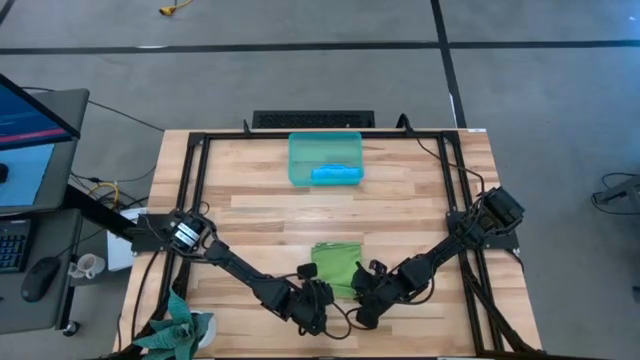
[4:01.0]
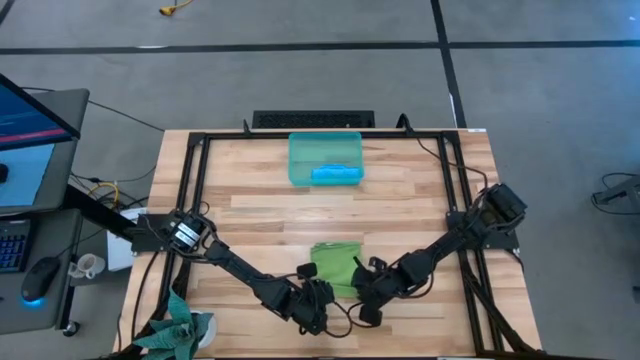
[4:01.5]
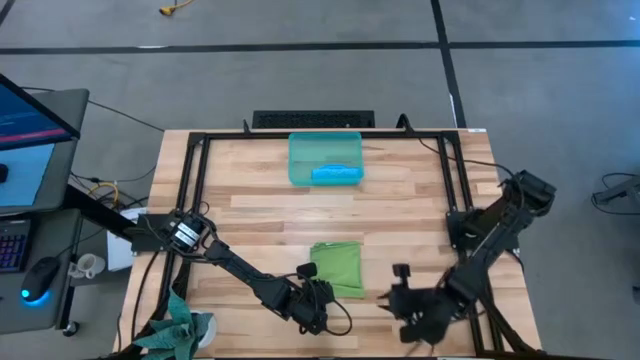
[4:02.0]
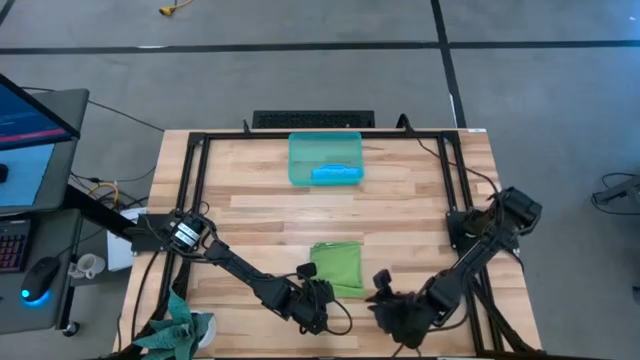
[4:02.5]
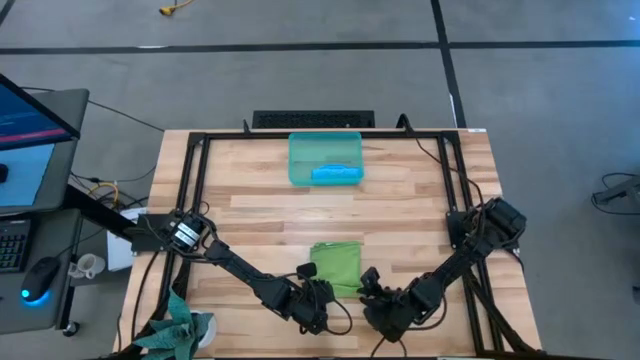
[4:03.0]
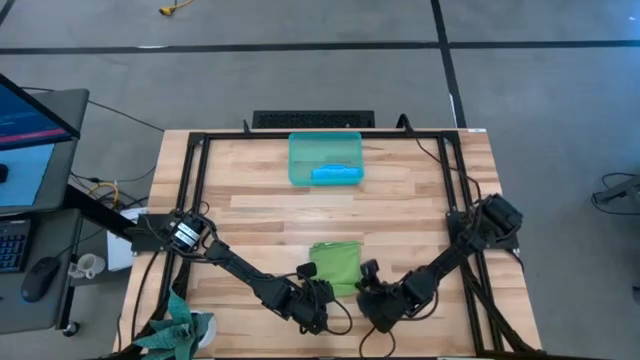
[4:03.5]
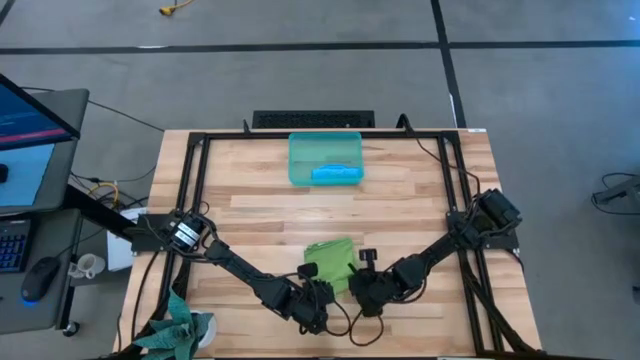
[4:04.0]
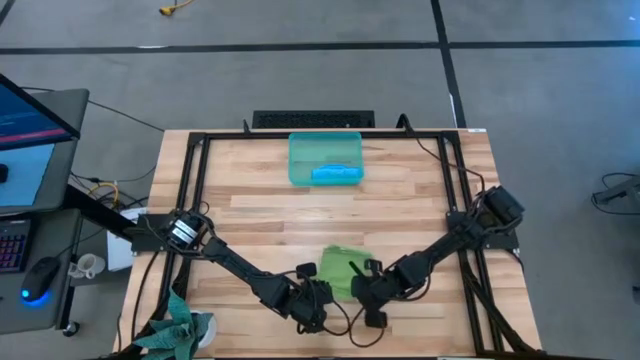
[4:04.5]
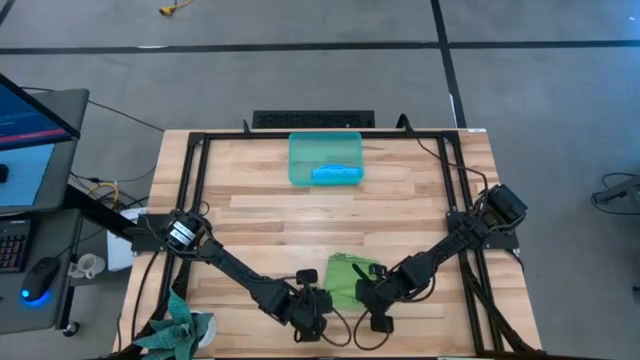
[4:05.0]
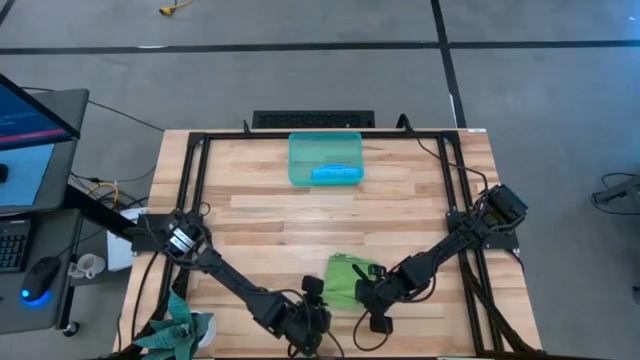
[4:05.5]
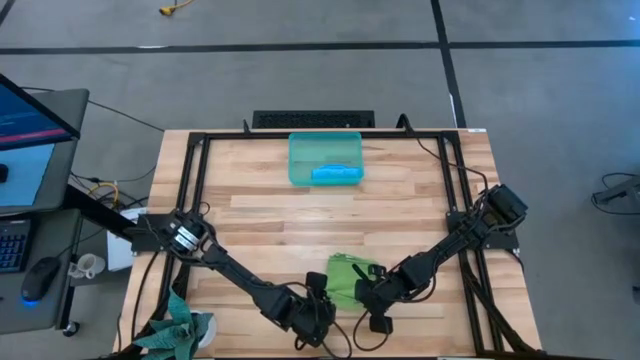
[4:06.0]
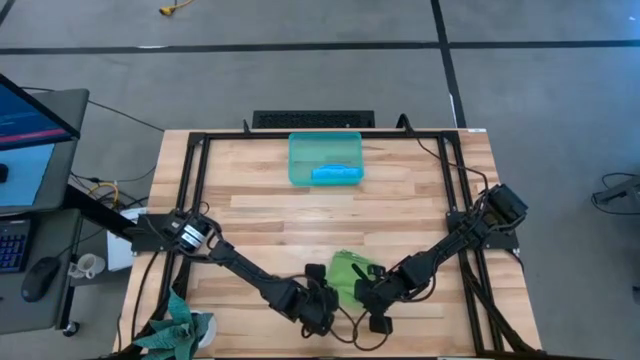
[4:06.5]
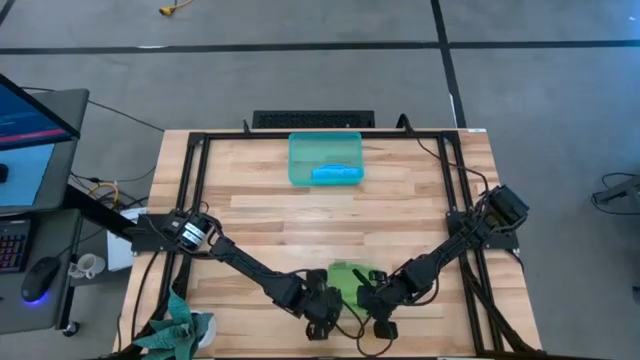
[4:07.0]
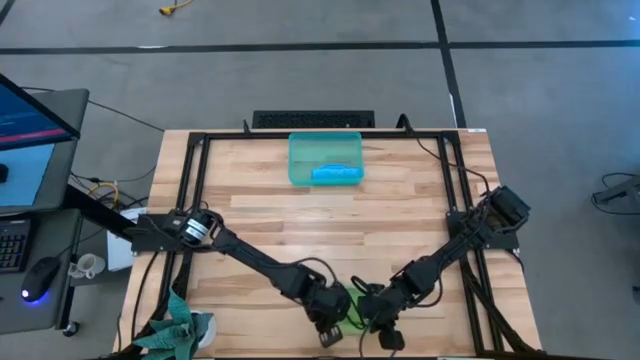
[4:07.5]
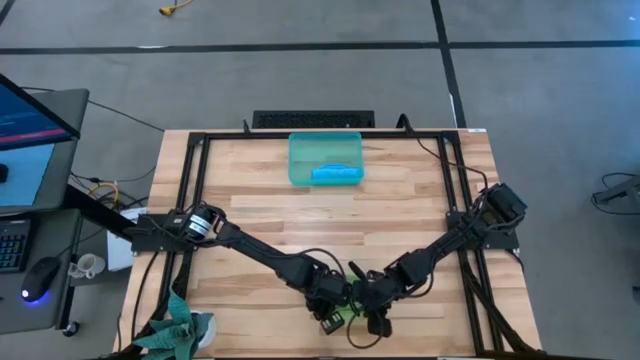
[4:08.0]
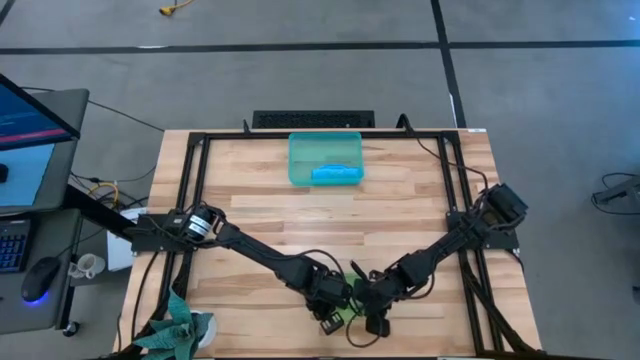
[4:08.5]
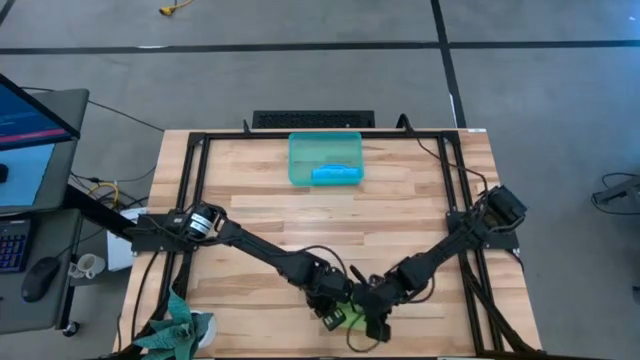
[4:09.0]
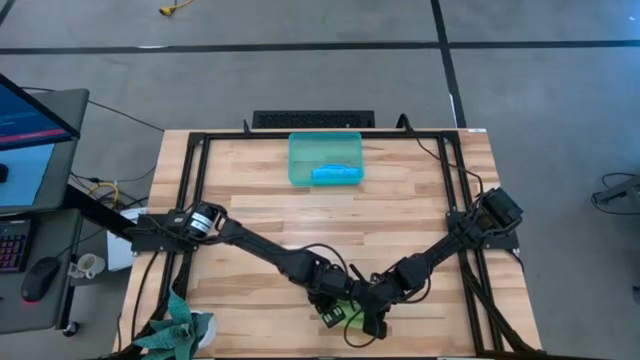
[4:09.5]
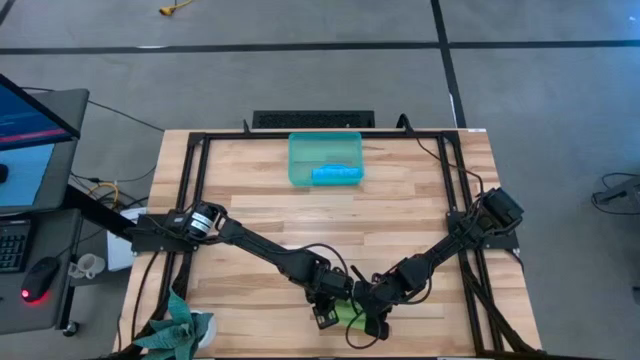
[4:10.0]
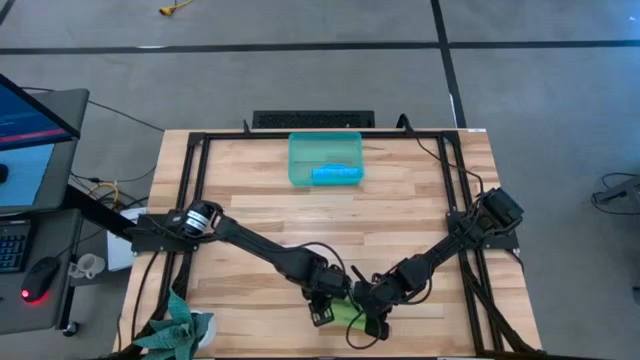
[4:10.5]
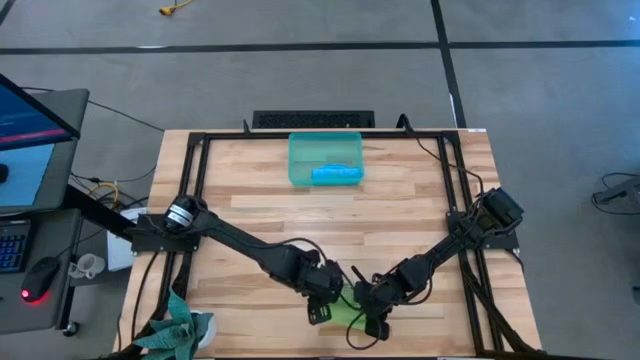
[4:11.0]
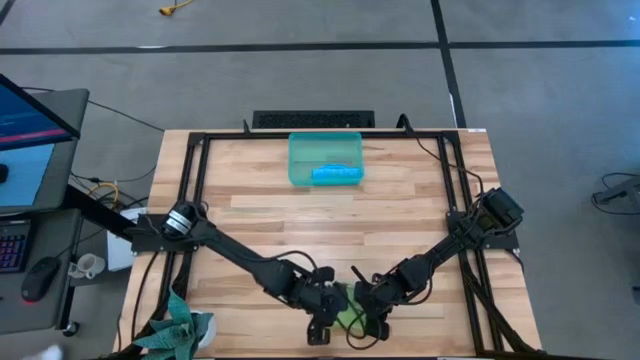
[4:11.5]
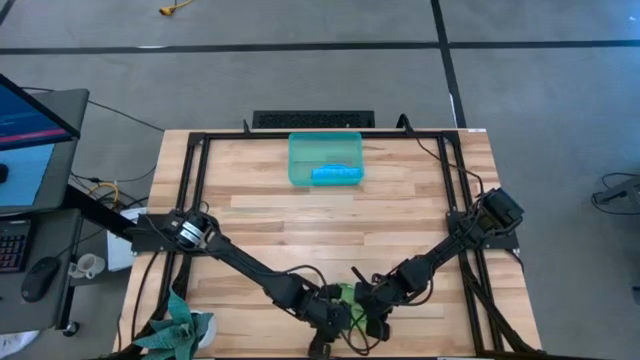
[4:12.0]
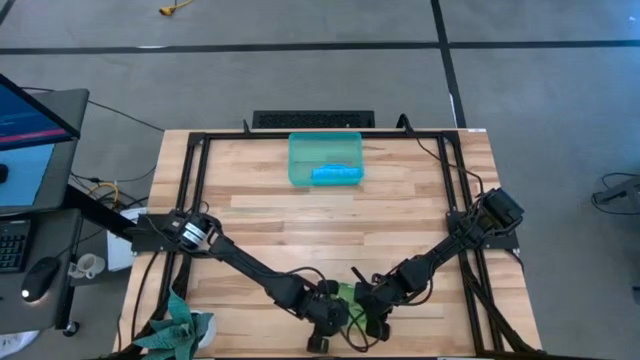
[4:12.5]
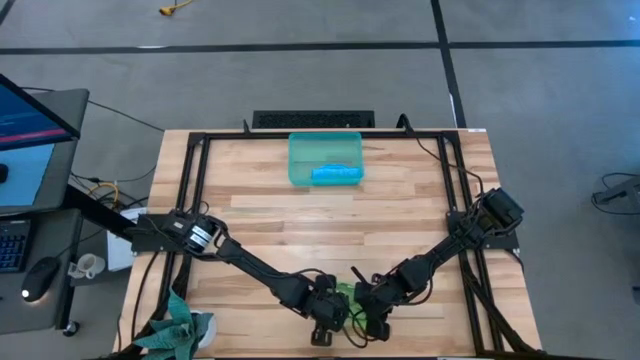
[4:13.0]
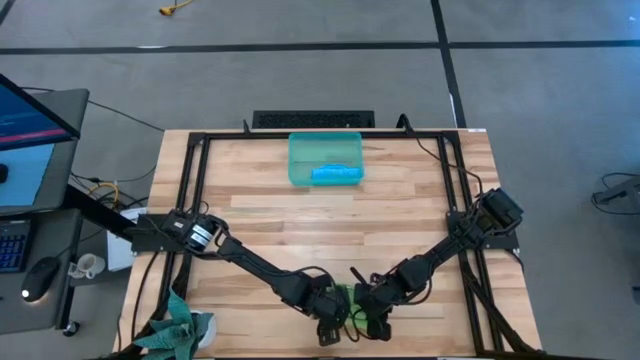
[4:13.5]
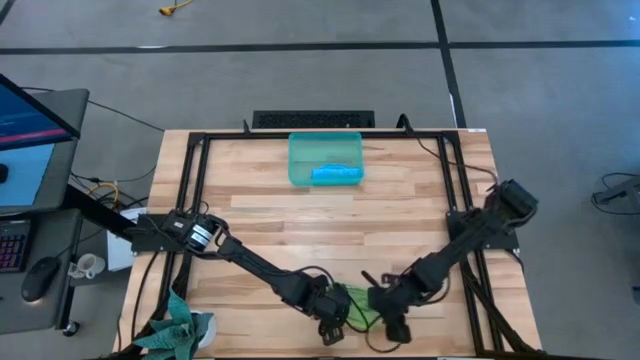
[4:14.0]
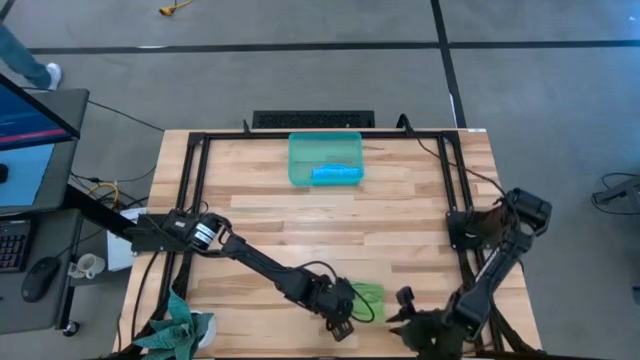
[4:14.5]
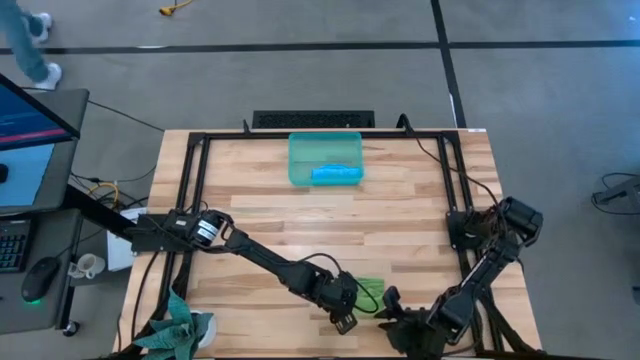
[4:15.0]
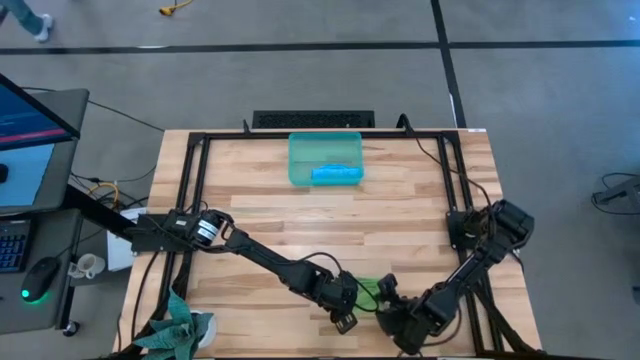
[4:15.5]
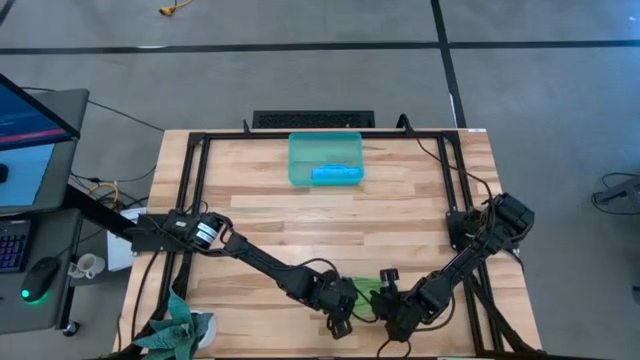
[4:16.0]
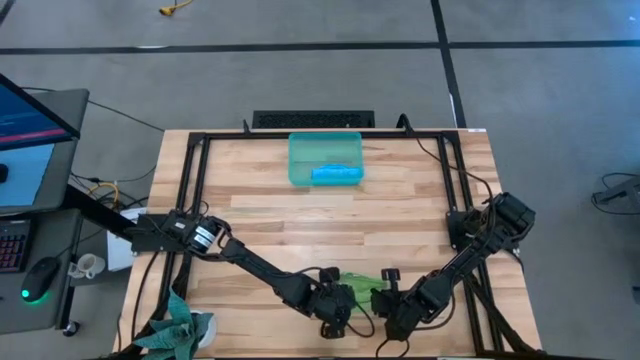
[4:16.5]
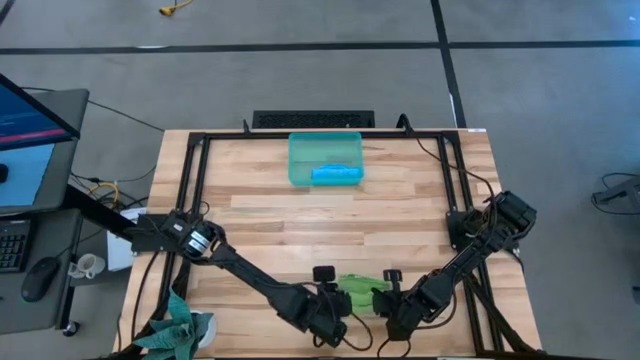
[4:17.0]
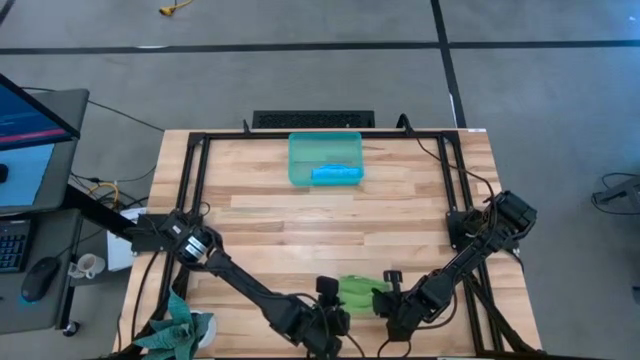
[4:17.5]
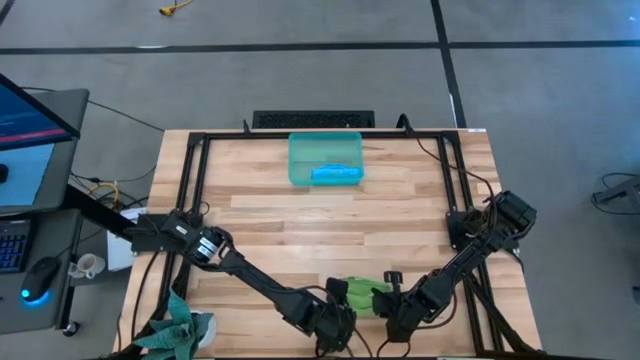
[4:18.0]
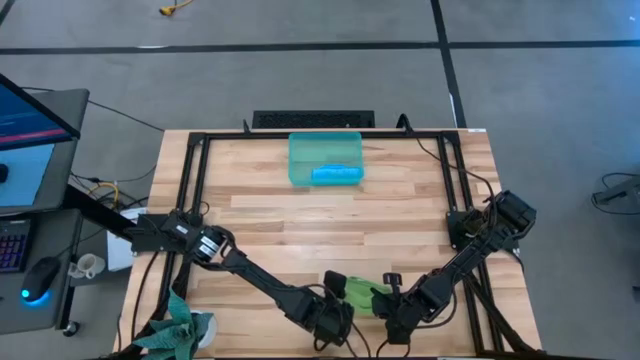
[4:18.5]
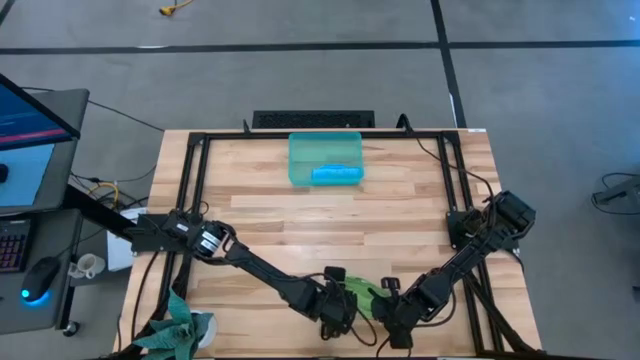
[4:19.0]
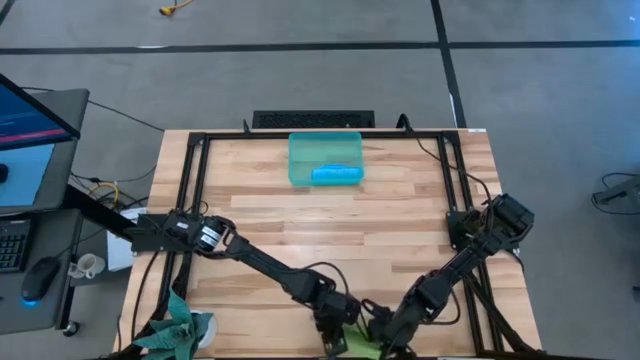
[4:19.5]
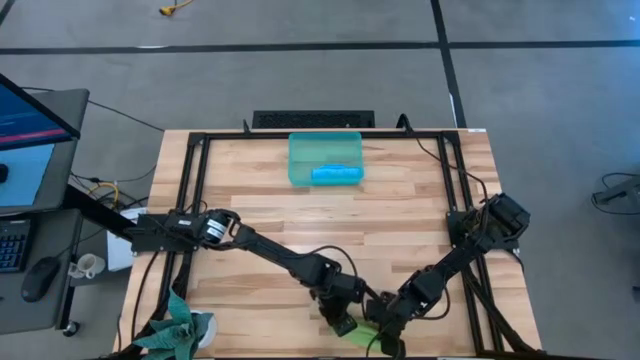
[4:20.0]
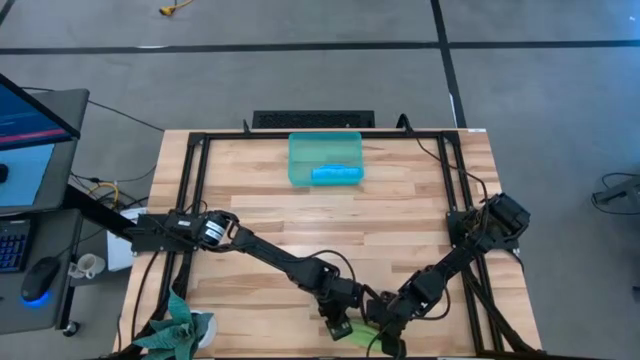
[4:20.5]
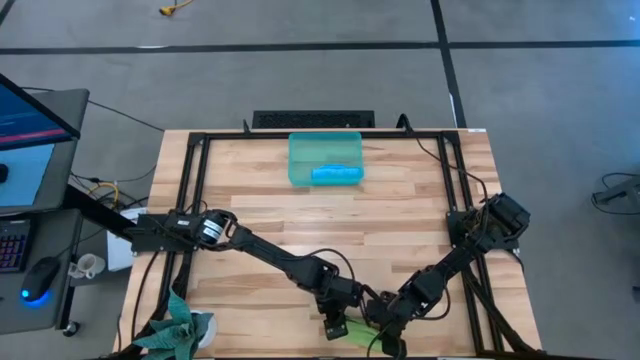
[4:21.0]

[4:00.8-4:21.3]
Task: Roll microfiber towels into tight, uniform cylinder then place into a basket
Roll the green microfiber cloth

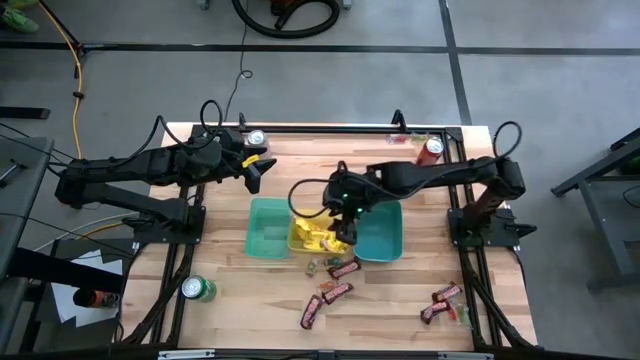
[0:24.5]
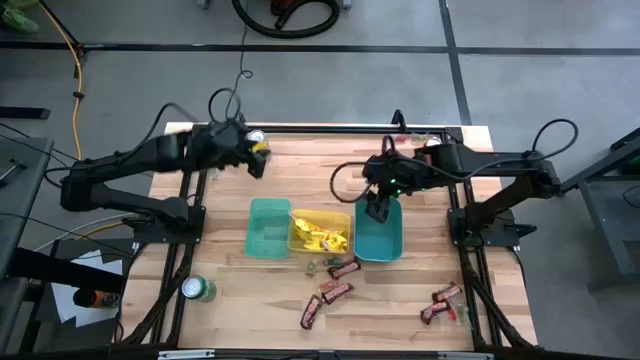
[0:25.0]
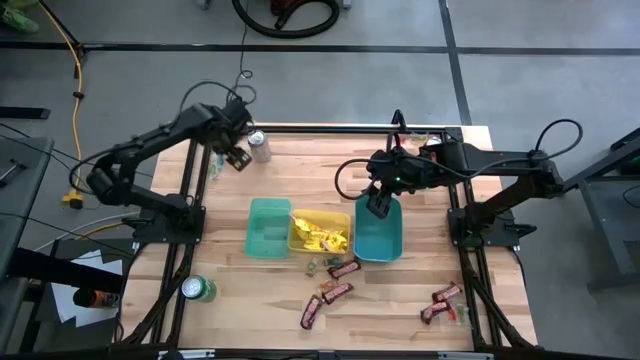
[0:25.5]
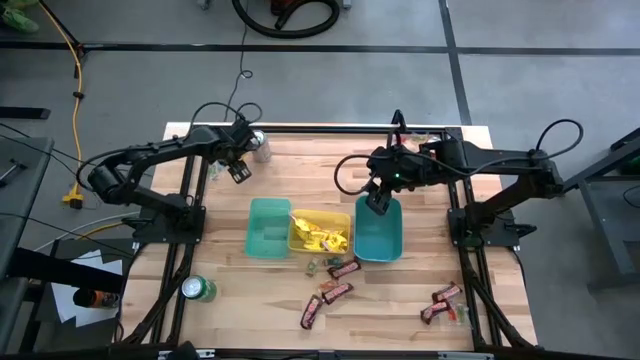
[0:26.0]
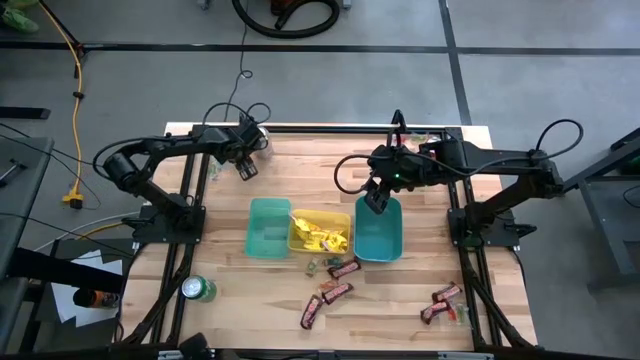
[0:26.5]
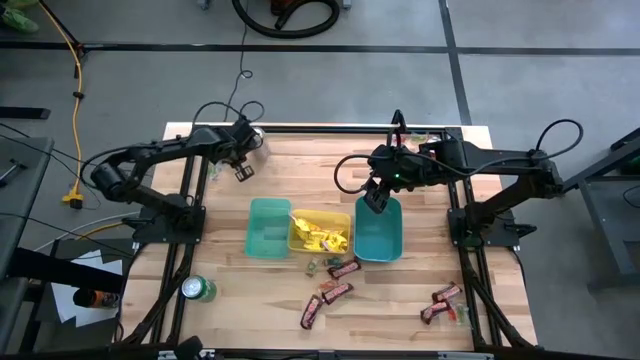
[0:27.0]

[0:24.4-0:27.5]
Task: Sort candy
Put the yellow candy into the yellow bin
